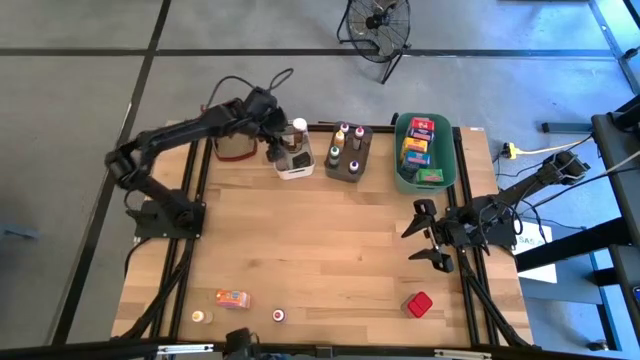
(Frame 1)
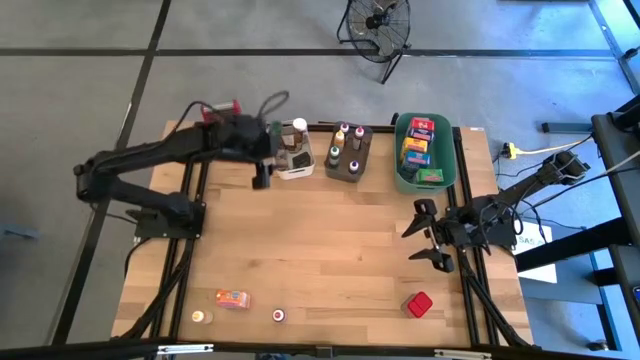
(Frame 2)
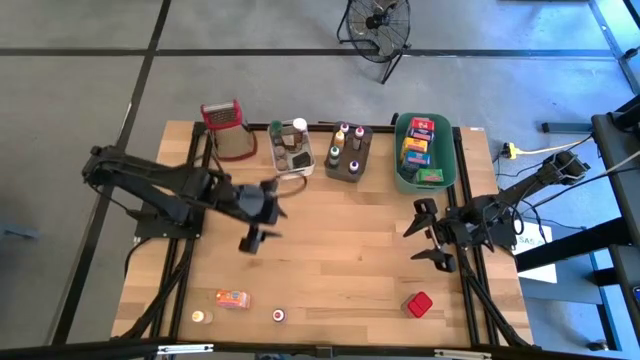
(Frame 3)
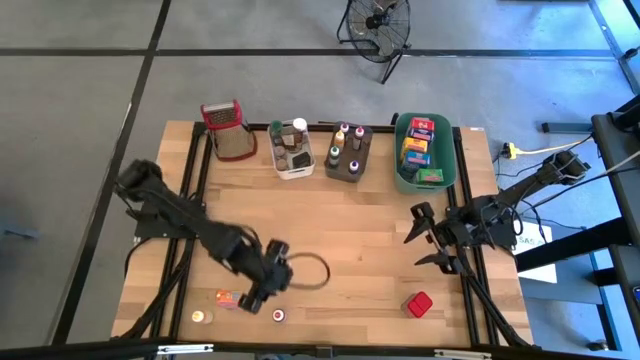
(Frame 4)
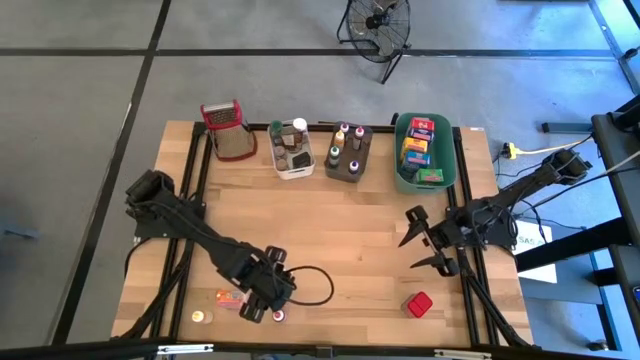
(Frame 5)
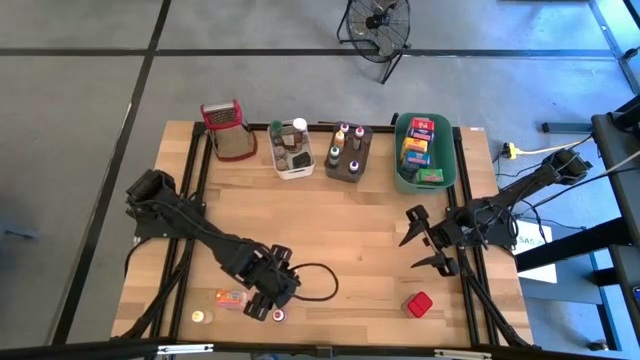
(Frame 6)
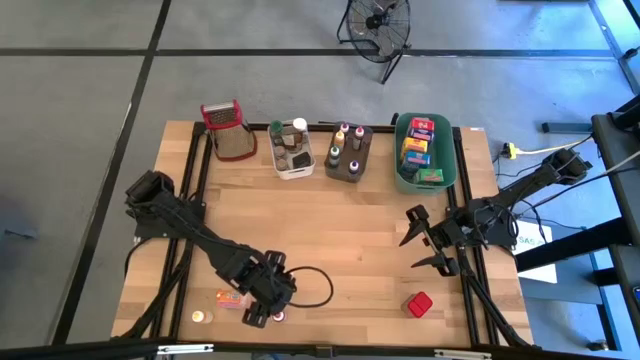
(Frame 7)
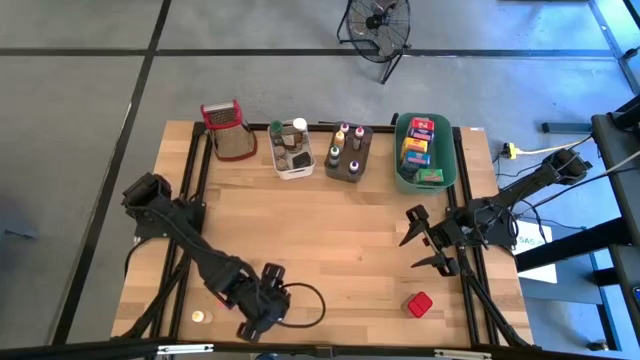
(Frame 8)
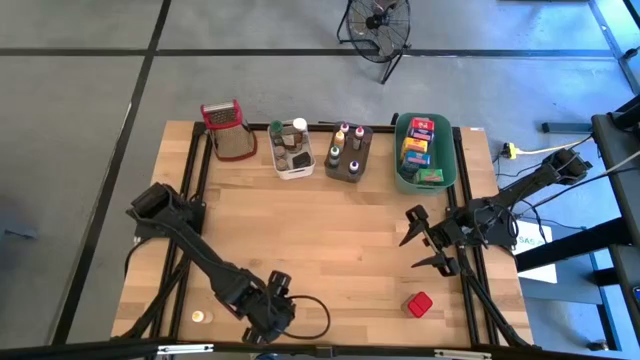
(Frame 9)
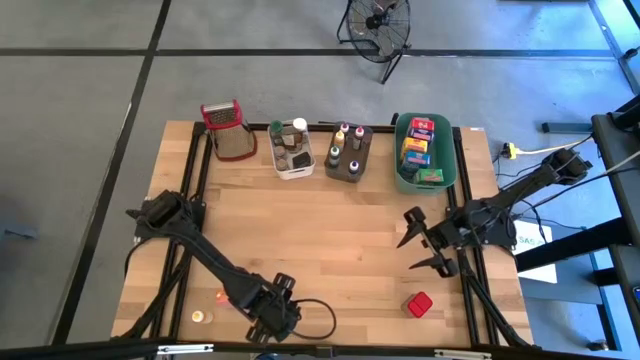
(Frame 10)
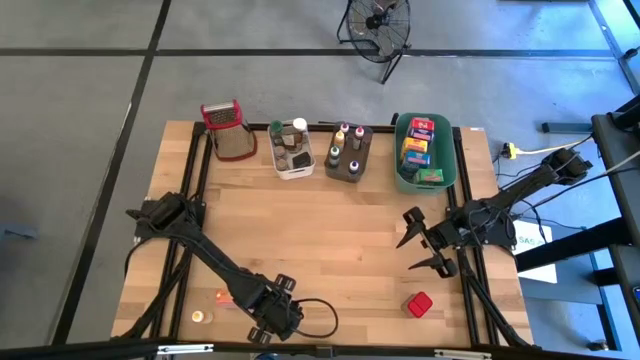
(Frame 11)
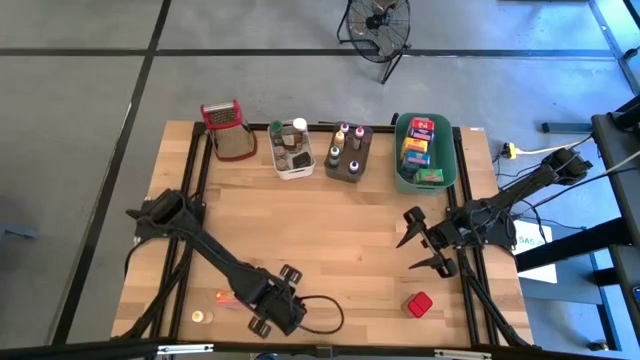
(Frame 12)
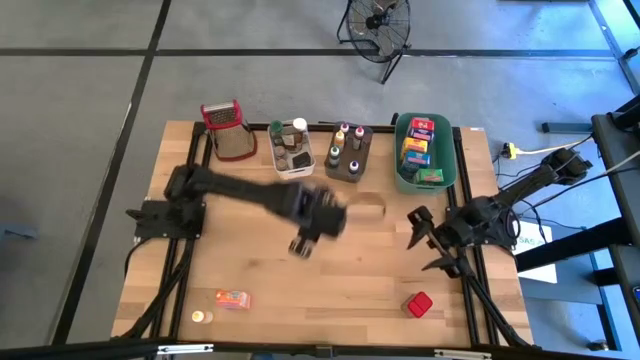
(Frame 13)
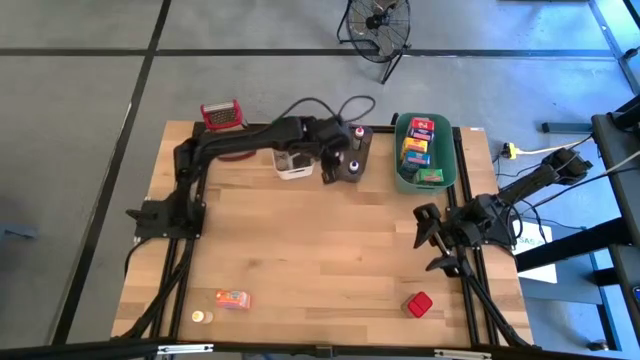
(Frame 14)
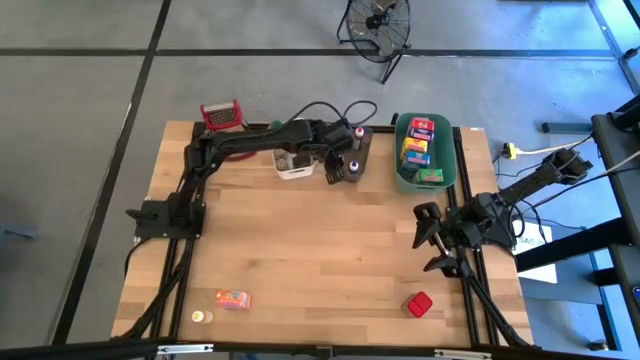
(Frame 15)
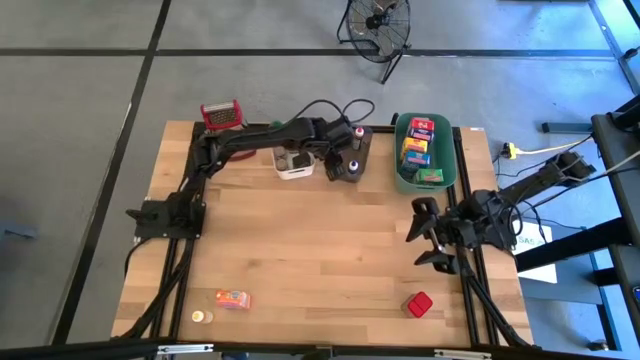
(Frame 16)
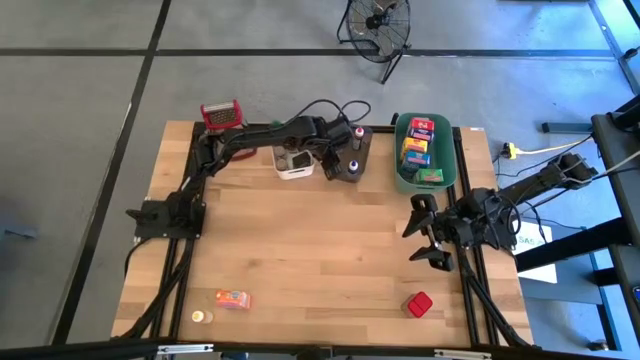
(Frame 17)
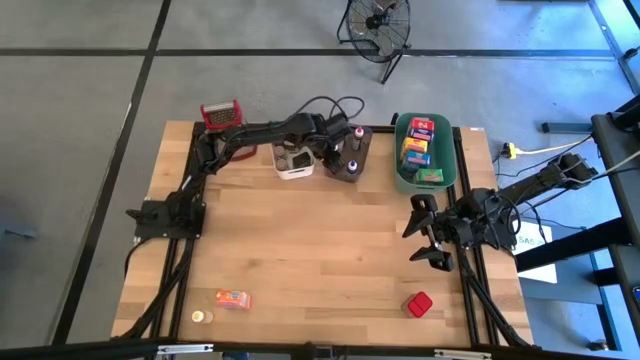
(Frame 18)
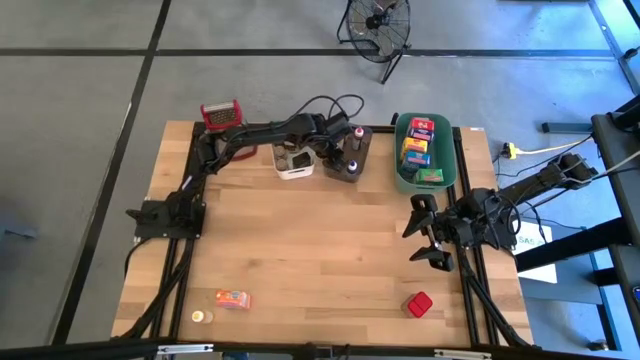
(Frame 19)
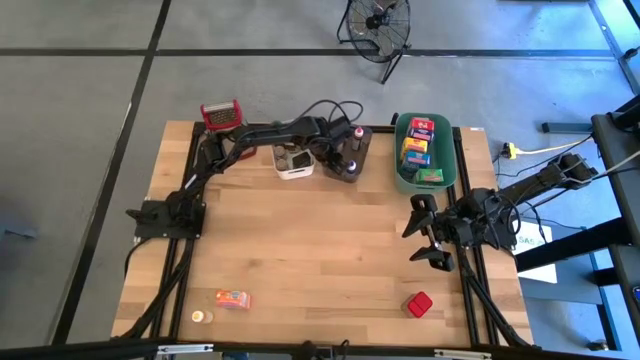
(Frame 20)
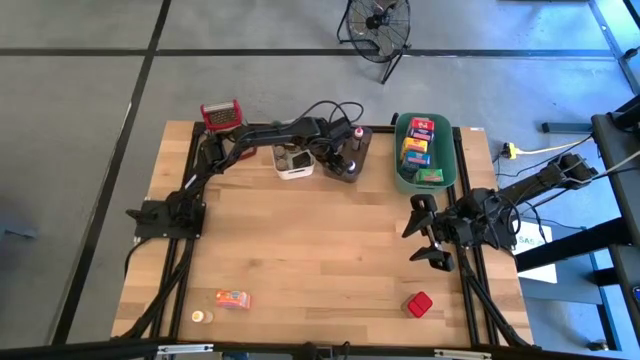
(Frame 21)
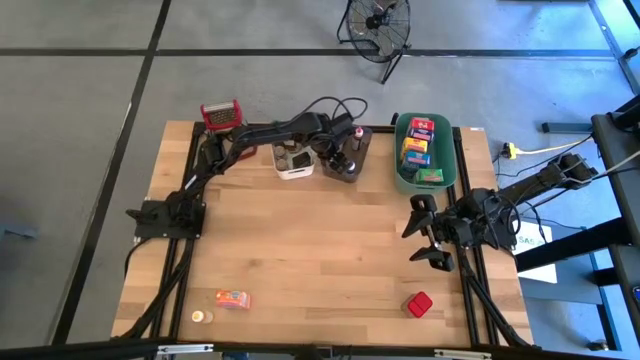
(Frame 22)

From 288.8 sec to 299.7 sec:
Task: Pick & Place Kitchen Items
Put the red coloring bottle into the black transparent bin

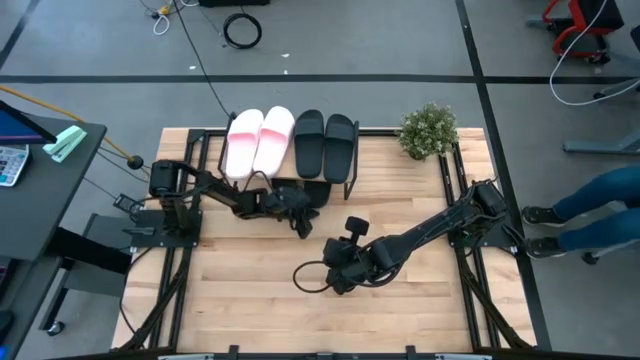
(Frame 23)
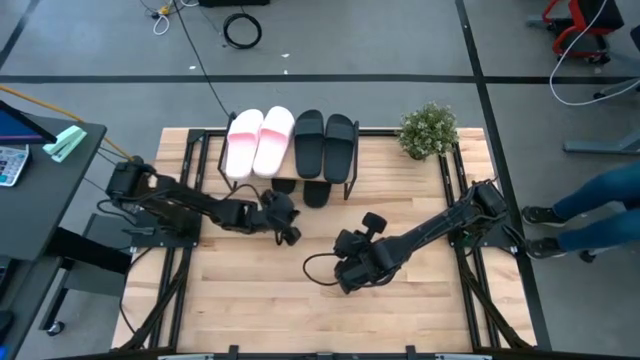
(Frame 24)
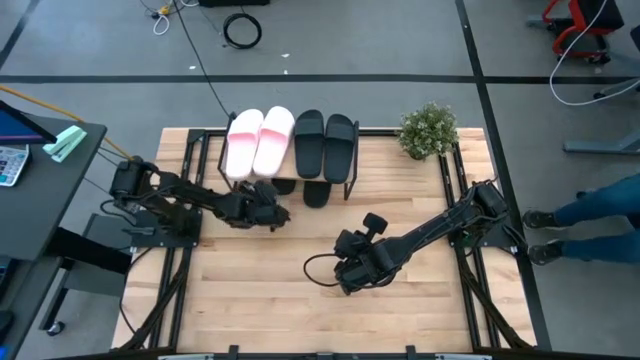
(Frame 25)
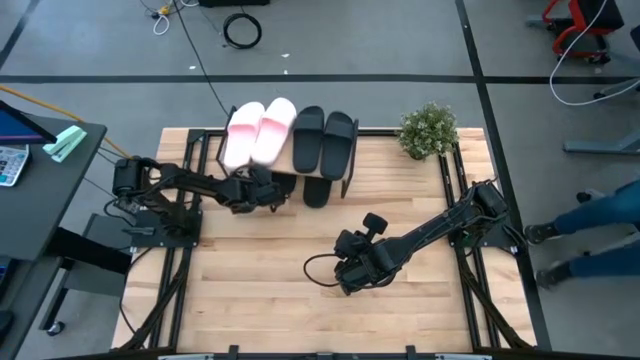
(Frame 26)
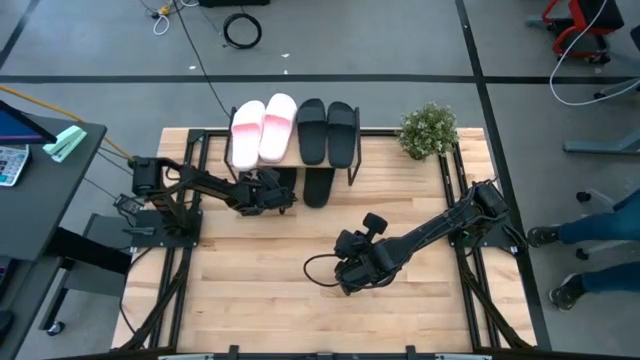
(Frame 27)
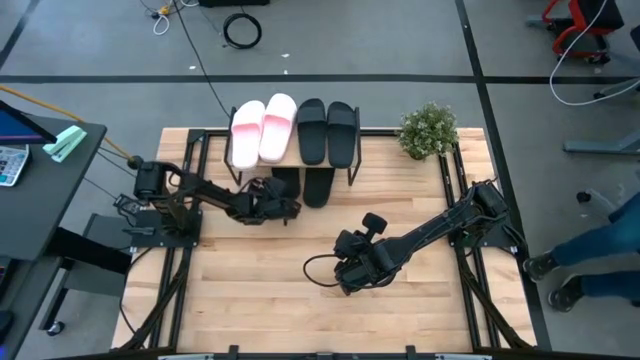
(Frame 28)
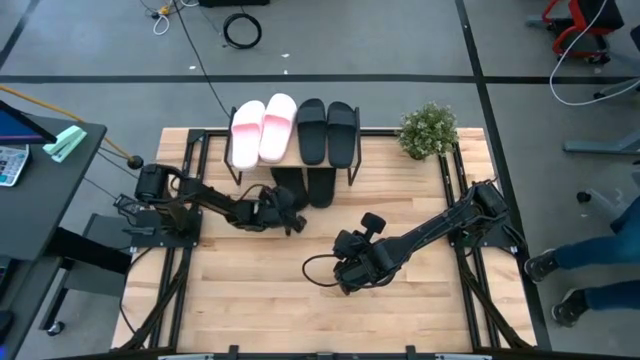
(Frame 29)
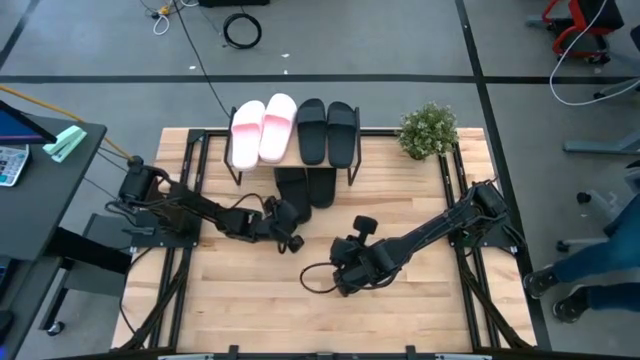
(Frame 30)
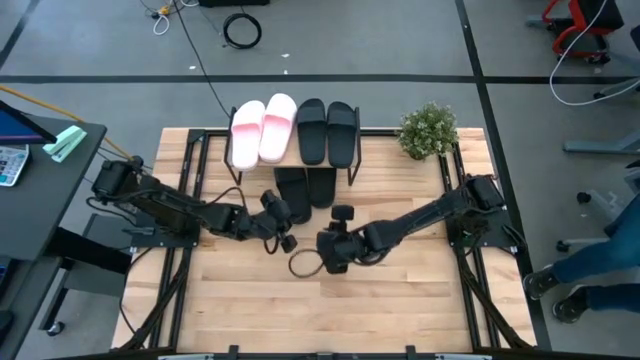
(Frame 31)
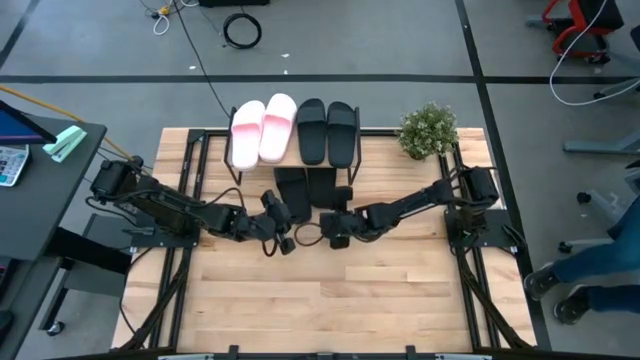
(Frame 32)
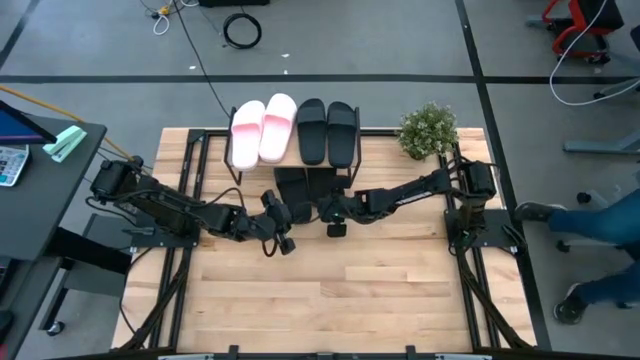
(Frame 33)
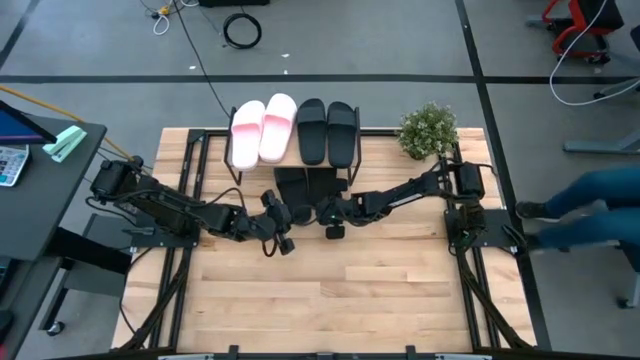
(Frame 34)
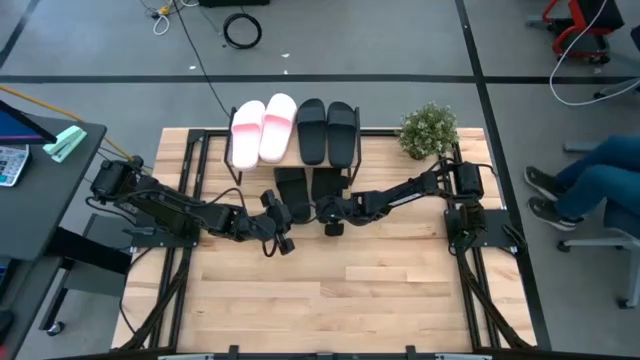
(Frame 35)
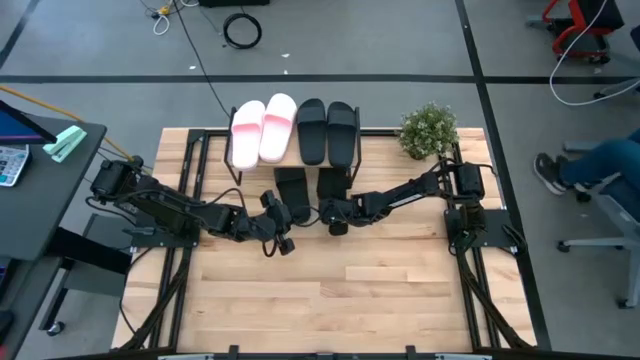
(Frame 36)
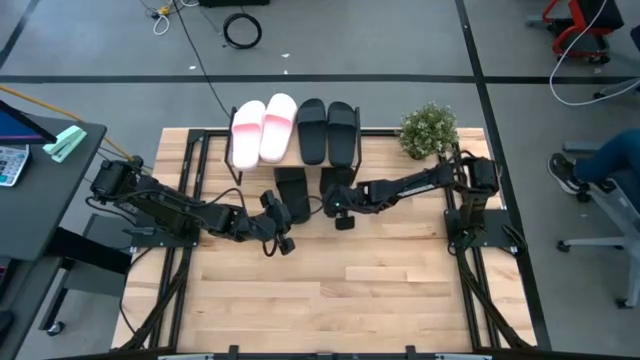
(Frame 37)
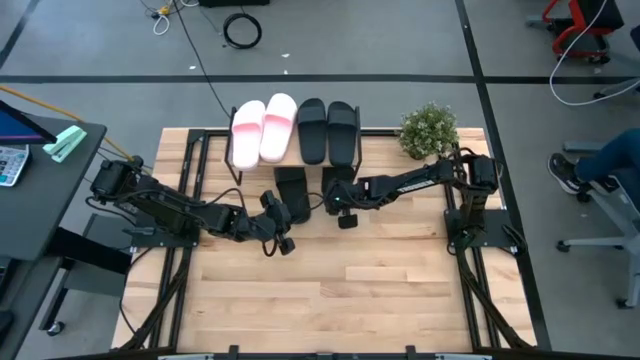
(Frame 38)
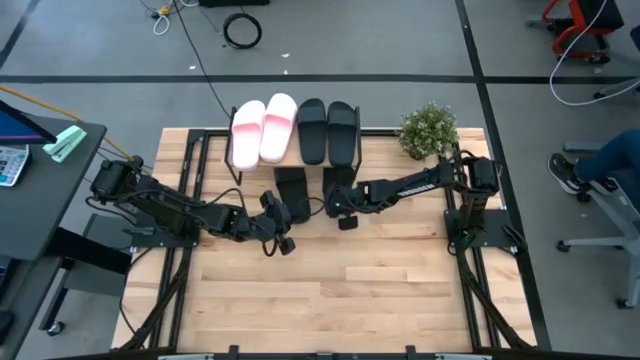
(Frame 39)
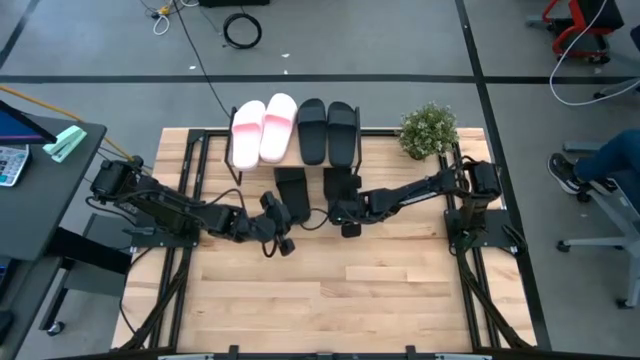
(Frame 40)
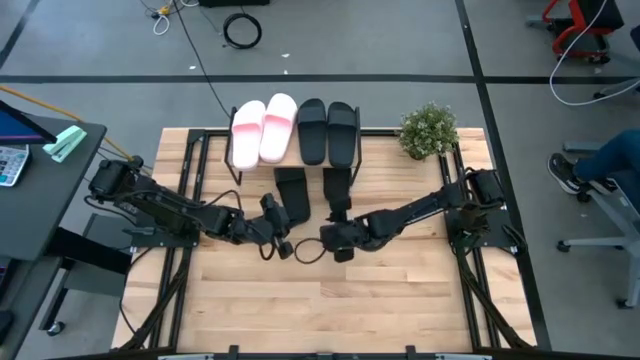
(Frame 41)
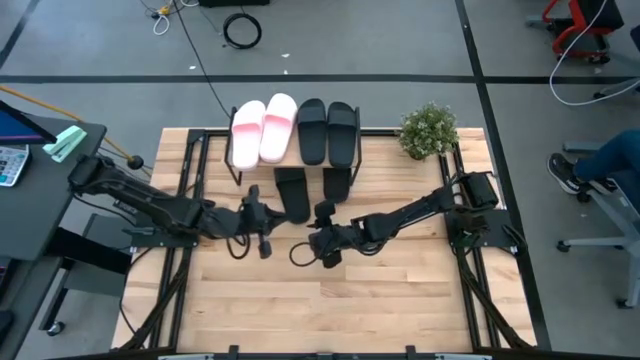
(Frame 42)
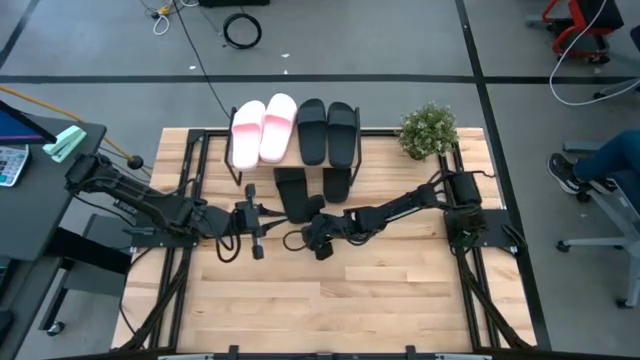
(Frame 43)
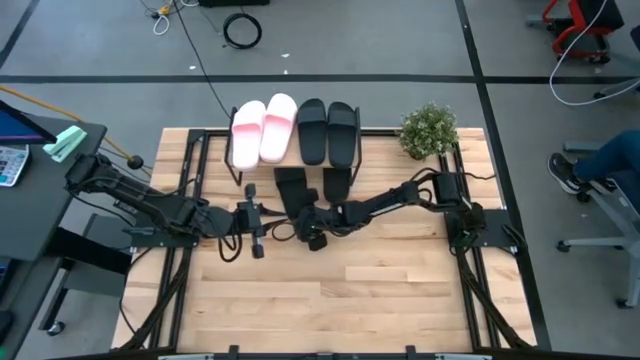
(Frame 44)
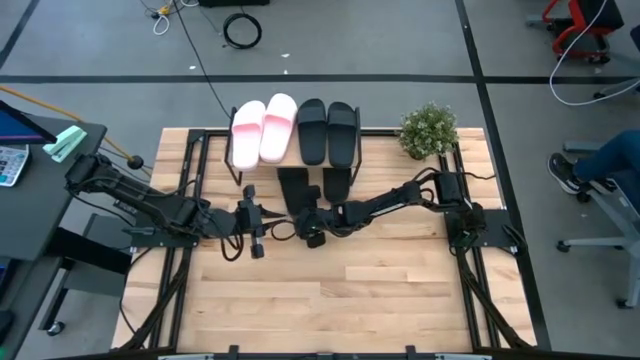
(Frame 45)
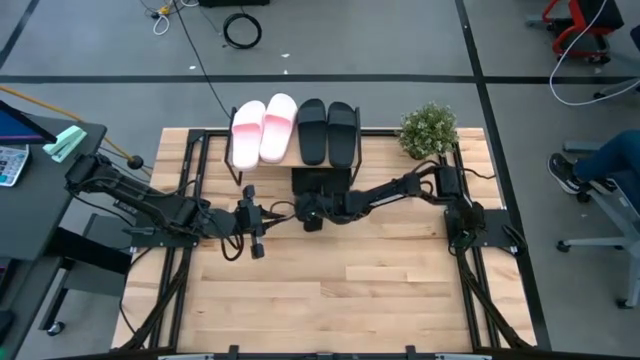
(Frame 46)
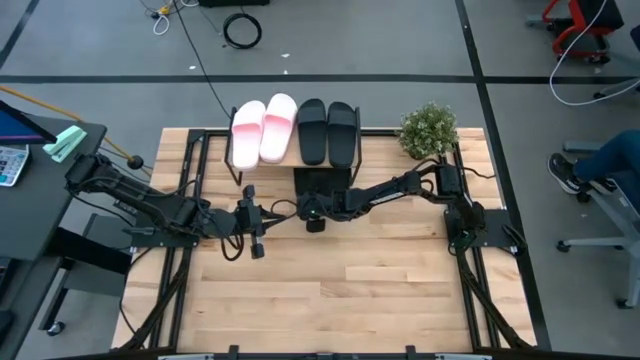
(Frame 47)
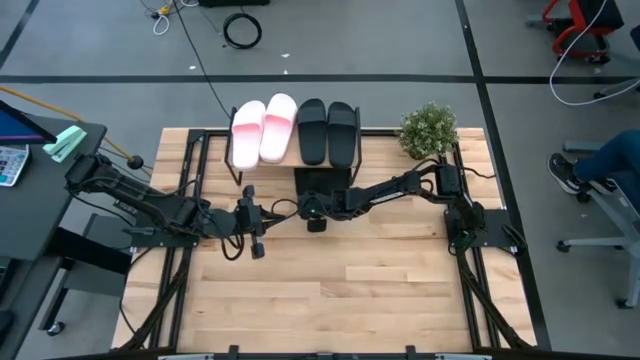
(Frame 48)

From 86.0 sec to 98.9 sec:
Task: Pick and place slides into the shelf
Adjust the black slides under the shelf
